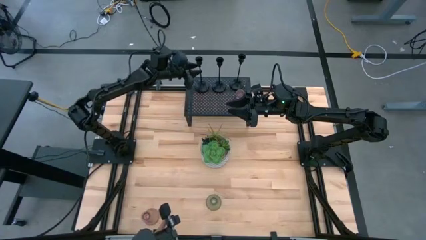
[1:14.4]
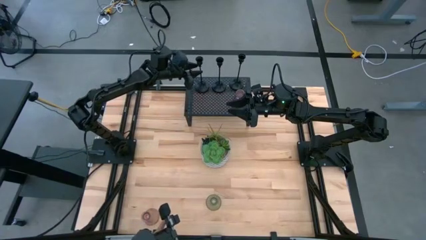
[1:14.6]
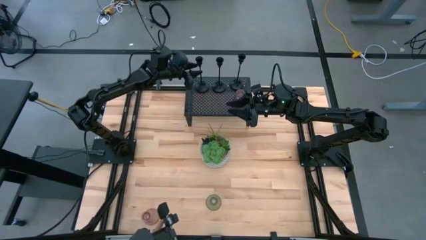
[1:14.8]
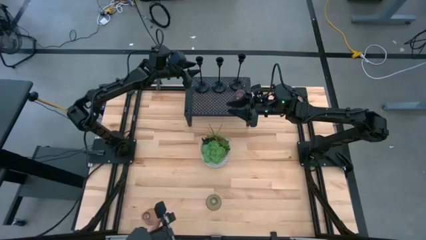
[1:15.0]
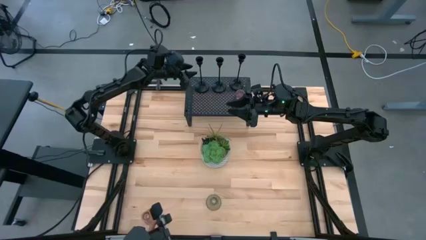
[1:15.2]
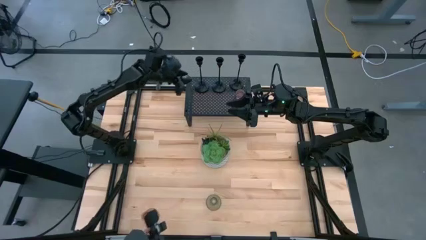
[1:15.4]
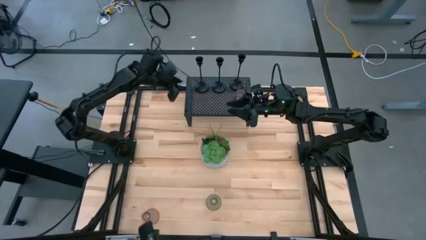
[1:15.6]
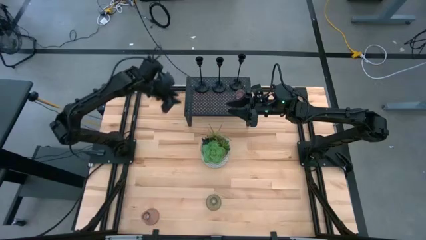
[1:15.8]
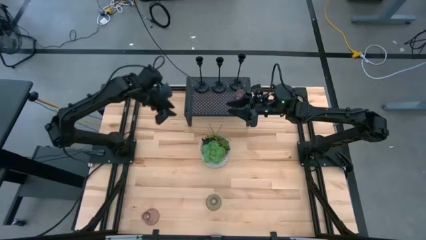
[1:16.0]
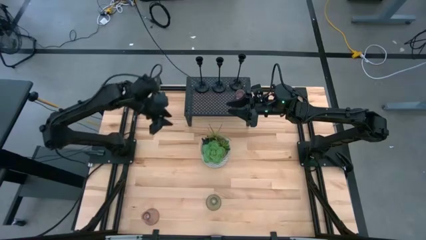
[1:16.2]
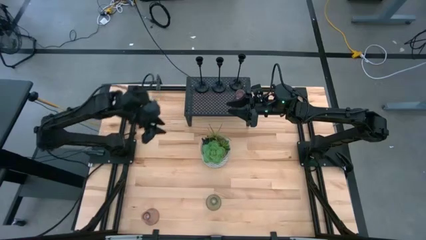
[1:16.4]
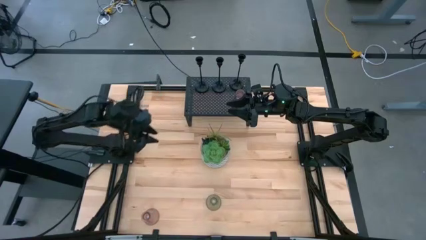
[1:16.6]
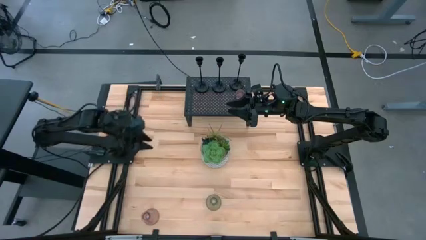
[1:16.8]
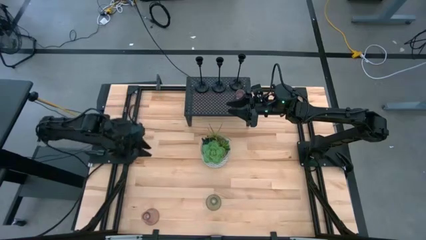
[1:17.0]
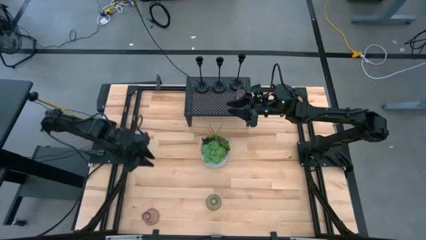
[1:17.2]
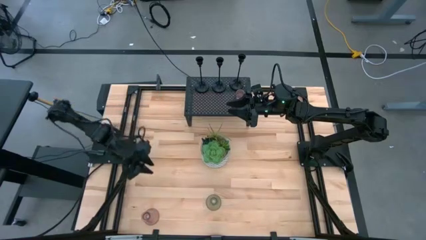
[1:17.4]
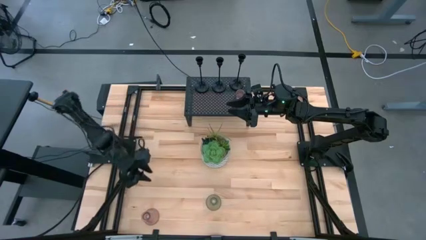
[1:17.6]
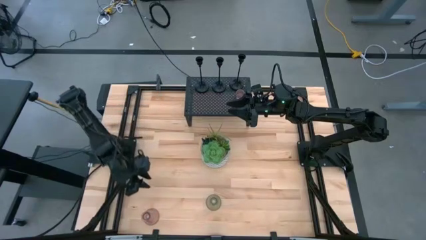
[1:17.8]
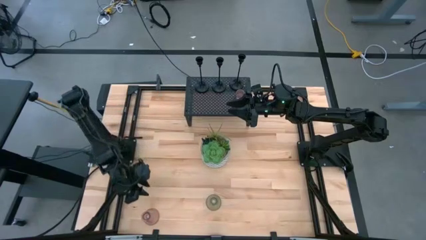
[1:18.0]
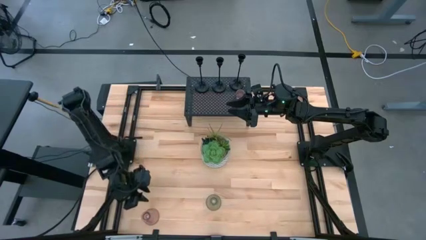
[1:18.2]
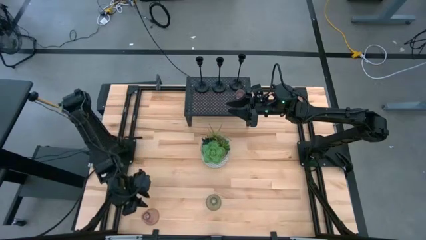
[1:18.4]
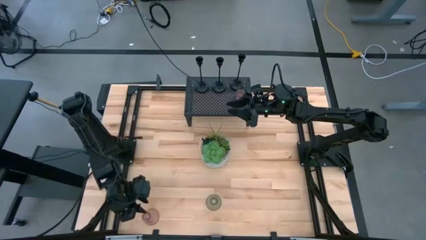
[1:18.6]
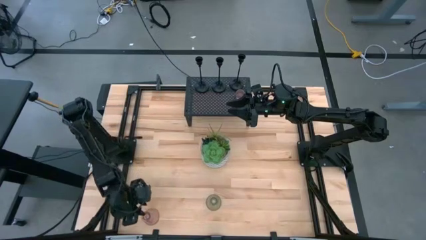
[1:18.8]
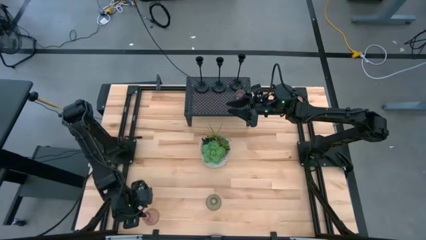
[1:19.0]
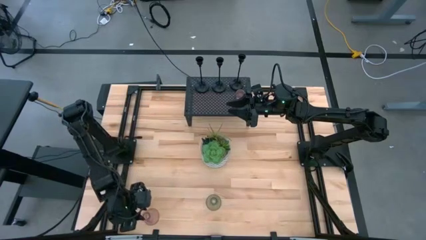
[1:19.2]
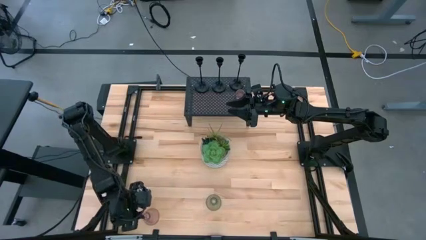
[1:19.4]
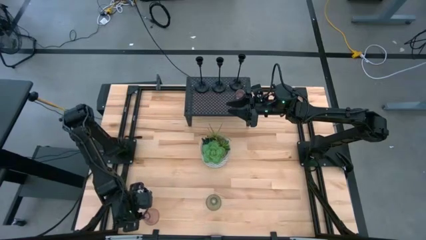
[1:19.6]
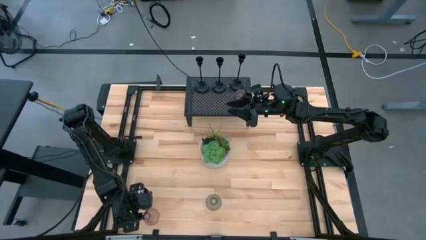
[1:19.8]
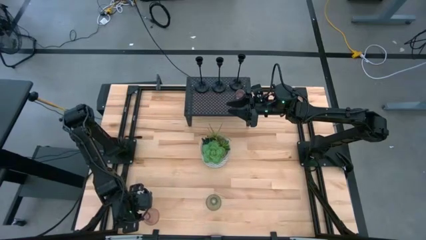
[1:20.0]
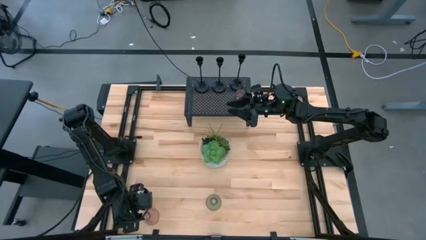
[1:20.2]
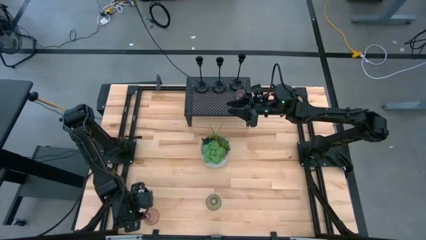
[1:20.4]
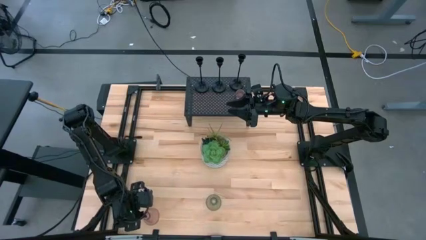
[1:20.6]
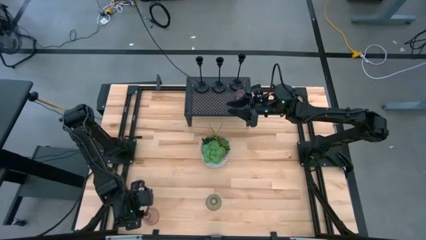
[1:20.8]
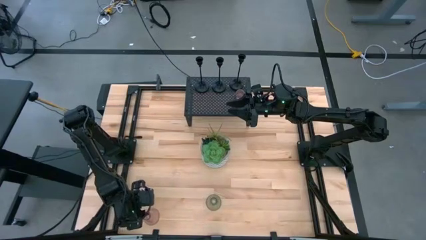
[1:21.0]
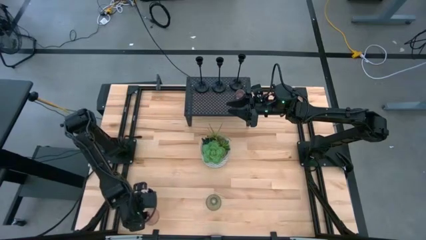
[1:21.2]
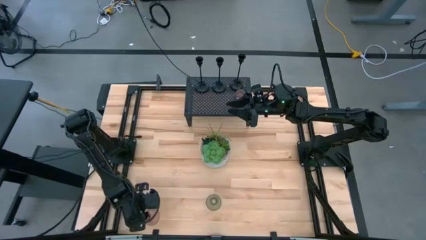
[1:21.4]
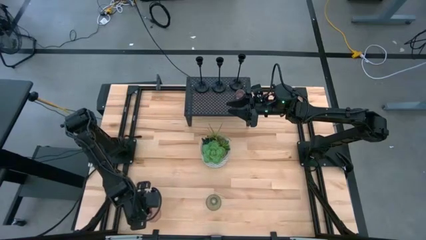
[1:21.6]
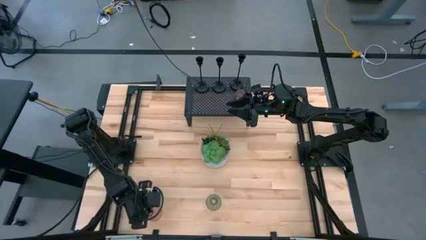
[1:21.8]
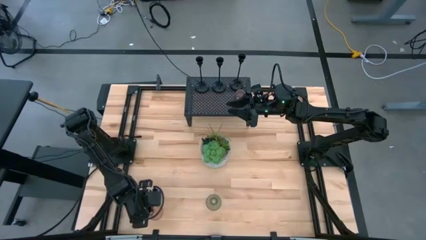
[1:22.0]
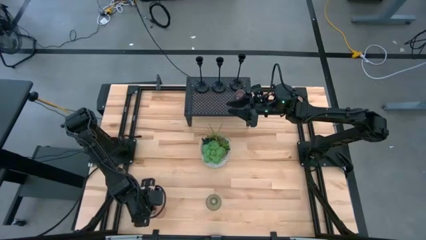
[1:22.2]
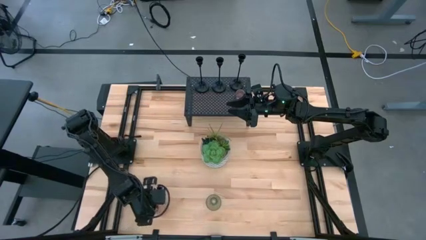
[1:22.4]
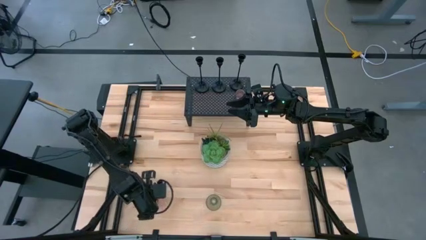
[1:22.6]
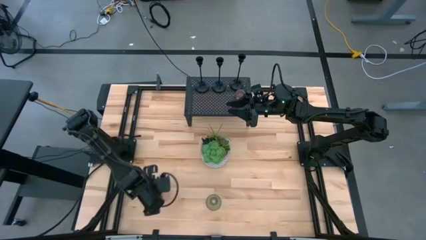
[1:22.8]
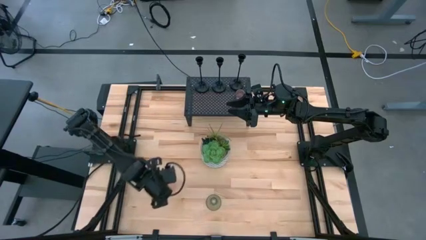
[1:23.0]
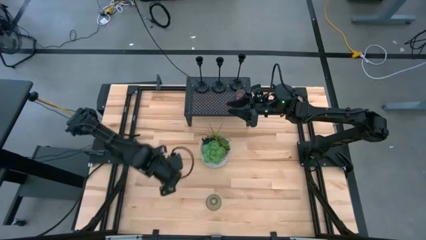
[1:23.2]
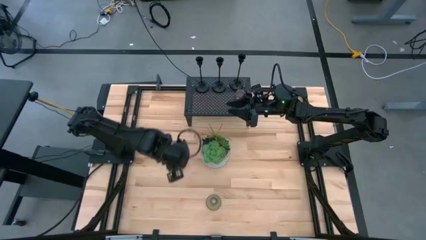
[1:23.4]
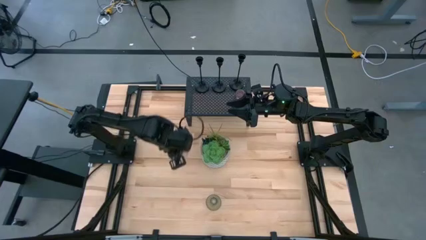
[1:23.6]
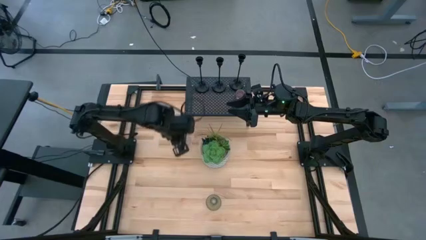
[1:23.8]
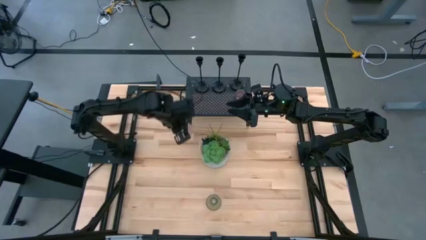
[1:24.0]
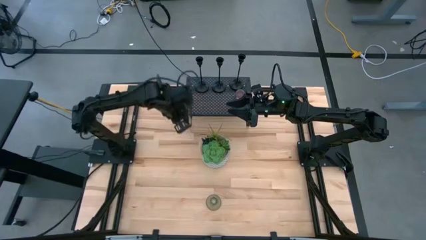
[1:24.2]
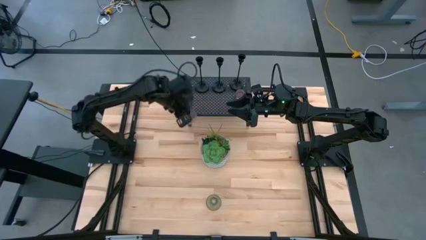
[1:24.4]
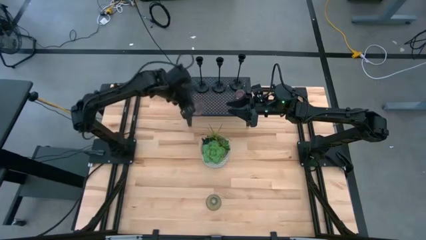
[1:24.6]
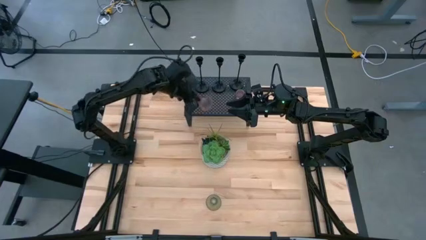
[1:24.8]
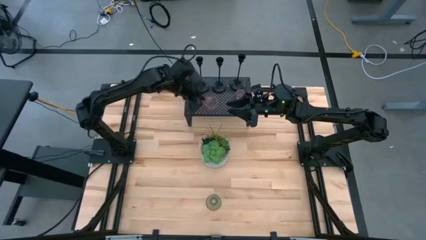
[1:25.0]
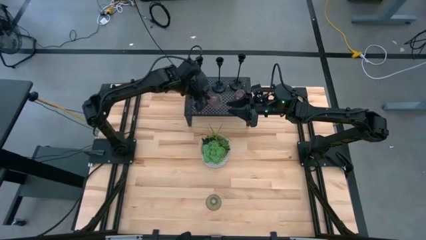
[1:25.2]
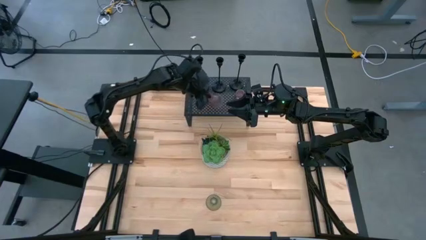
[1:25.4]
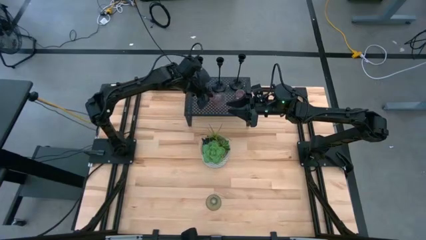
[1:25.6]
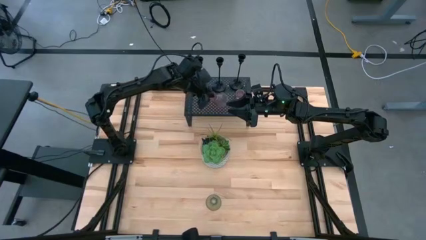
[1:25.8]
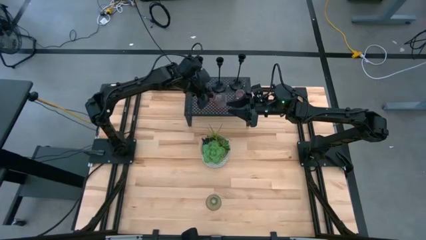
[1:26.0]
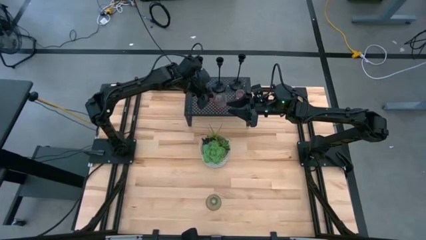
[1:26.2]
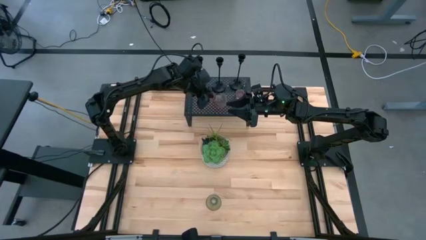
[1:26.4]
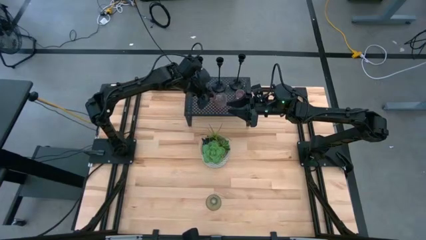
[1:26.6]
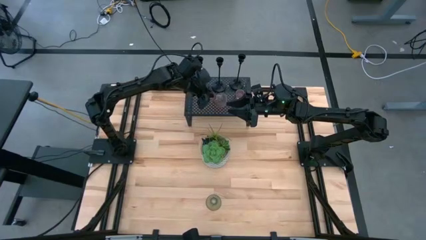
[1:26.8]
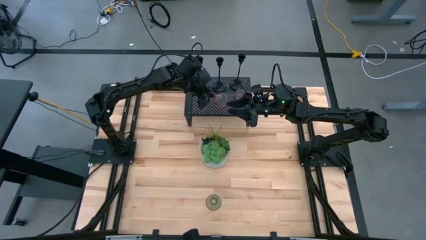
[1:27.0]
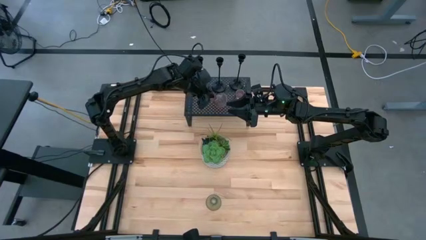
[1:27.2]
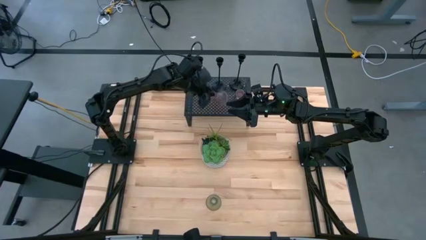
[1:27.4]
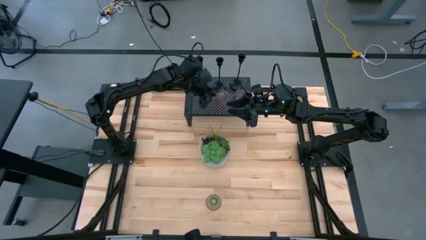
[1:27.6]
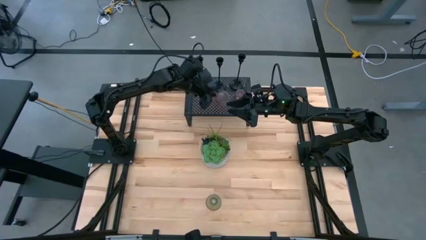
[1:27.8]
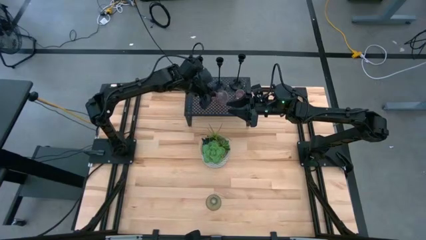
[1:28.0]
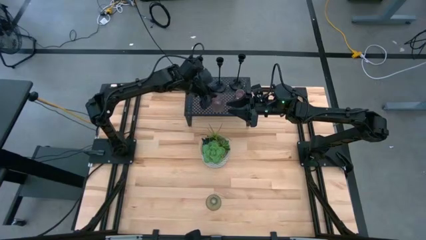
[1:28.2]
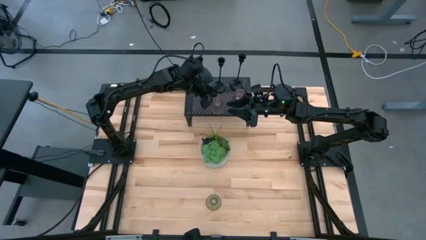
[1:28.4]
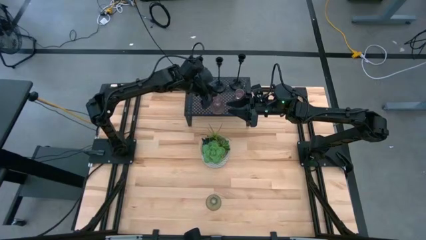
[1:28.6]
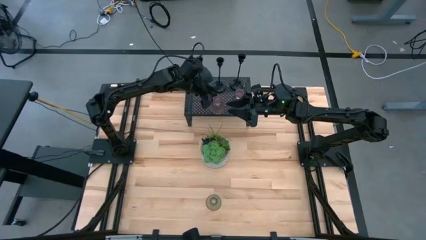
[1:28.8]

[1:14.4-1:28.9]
Task: Pick & Place candle stick holders
Put the pink glass candle holder on the shelf aligned with the middle black candle holder
